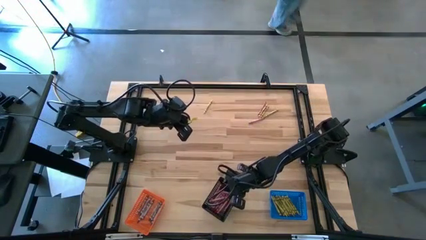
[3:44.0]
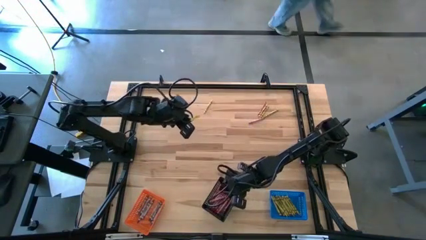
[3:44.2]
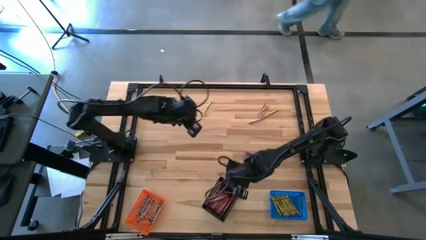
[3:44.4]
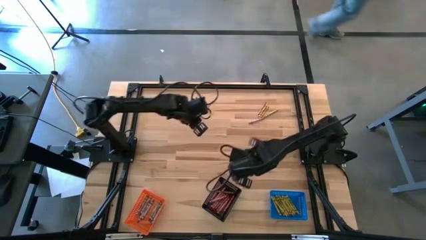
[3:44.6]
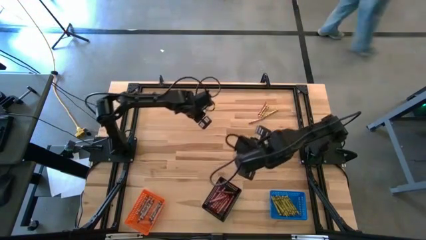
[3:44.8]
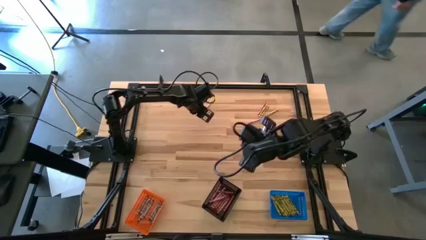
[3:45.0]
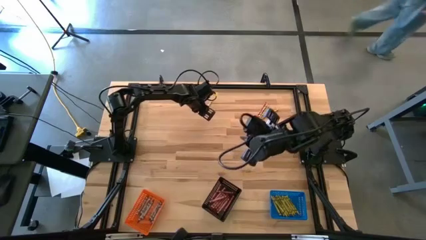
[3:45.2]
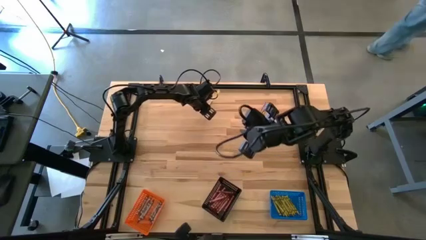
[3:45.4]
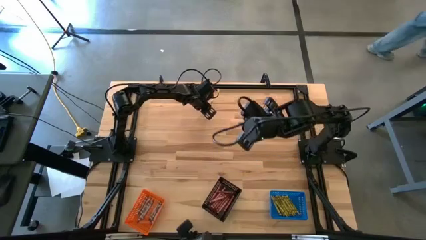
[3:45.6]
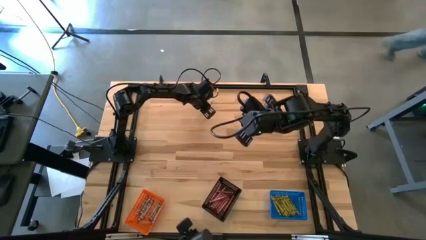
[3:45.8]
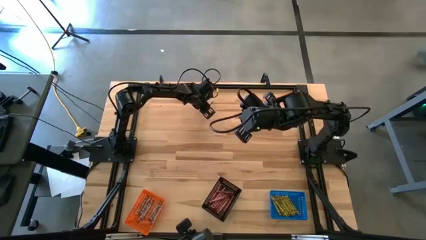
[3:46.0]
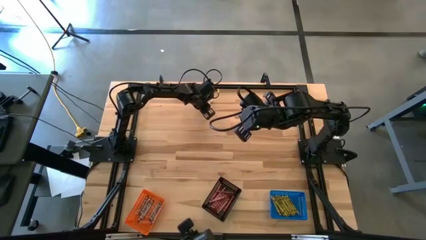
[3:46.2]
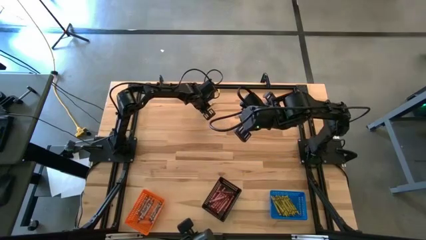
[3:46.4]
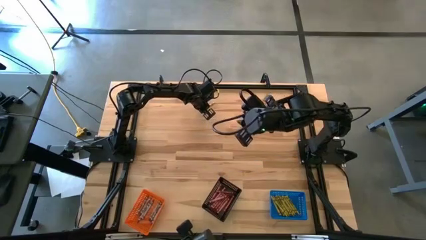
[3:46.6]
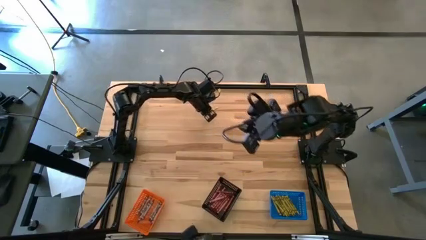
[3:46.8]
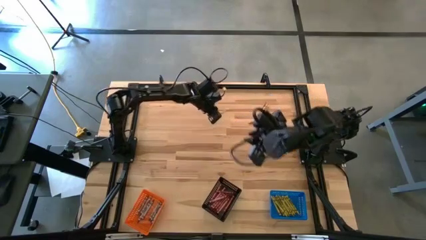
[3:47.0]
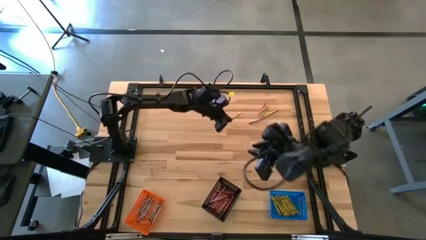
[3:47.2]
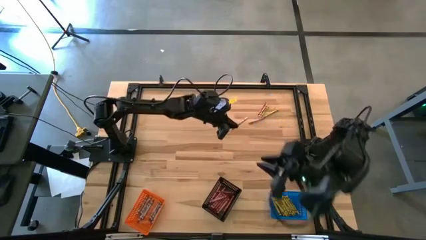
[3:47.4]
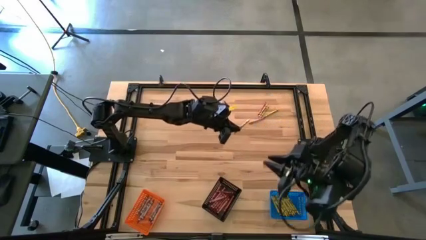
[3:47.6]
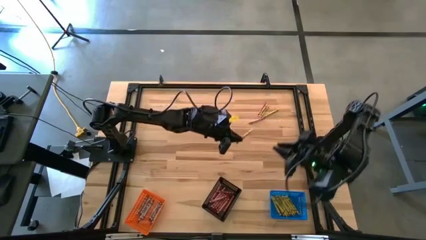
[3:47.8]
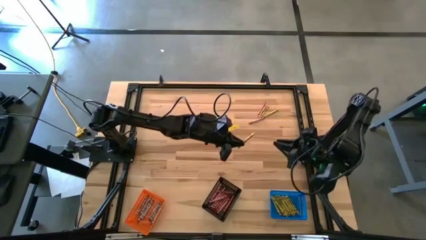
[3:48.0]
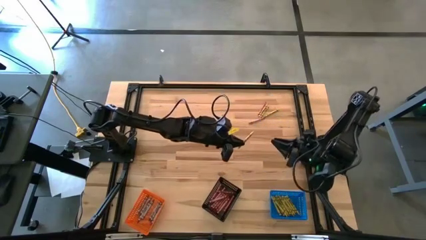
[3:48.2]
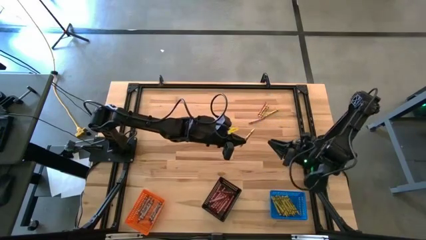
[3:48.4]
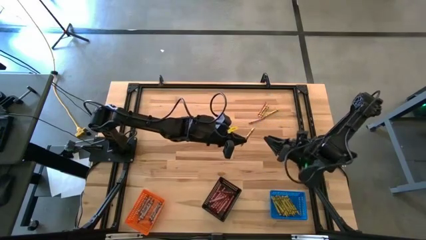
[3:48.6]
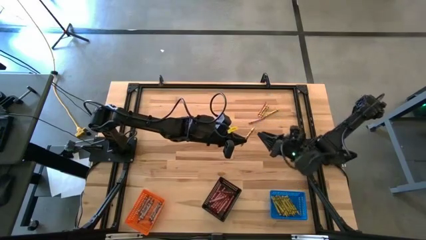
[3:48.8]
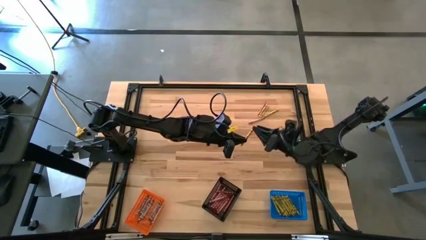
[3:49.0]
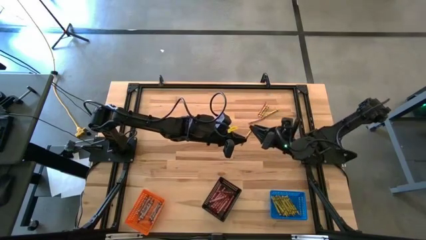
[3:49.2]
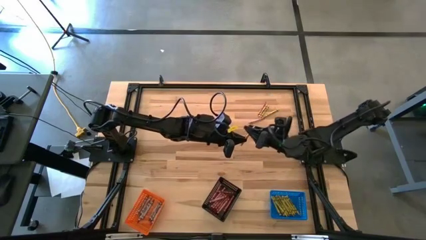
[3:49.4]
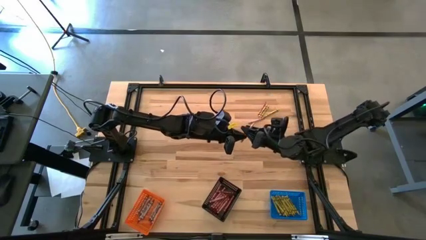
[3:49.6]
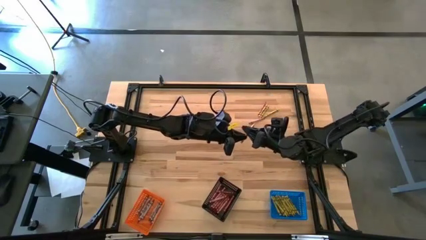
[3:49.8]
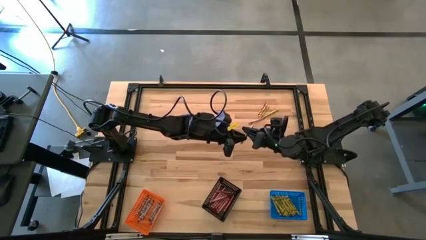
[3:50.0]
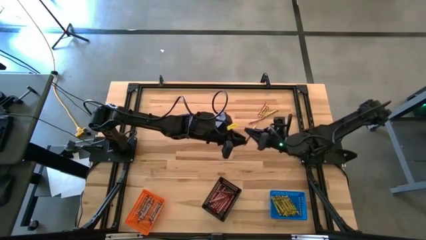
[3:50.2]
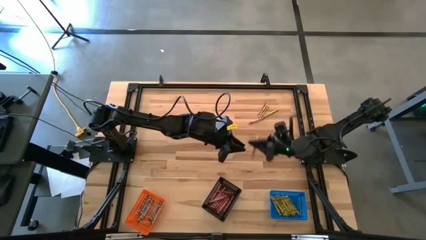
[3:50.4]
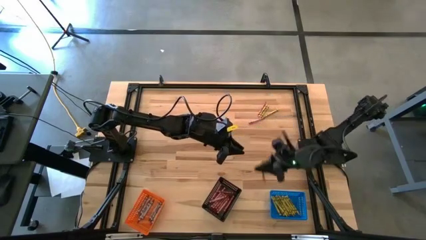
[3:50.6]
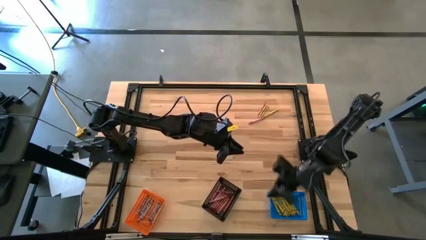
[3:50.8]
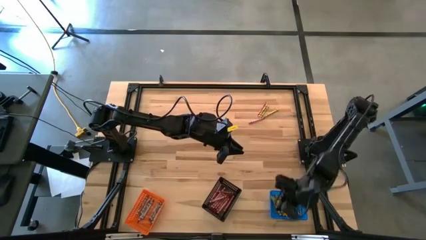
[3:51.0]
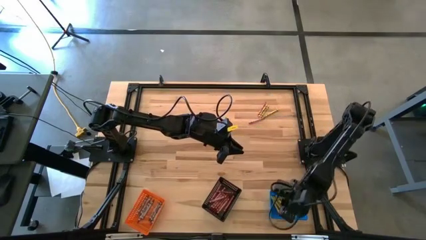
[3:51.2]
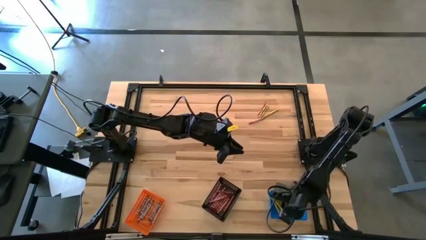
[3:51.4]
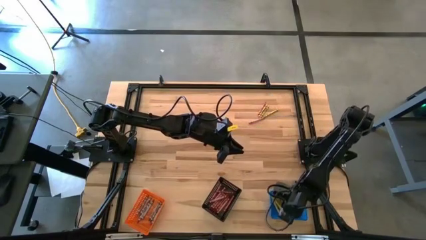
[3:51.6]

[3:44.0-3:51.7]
Task: Sort crayons
Put the yellow crayon into the blue bin

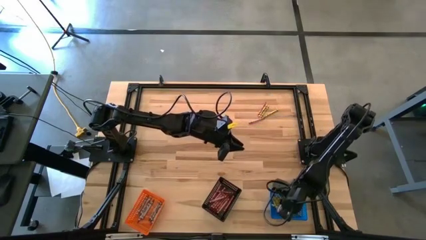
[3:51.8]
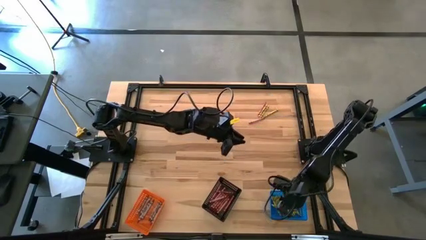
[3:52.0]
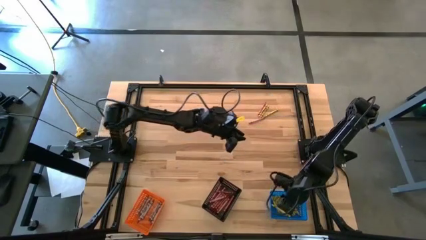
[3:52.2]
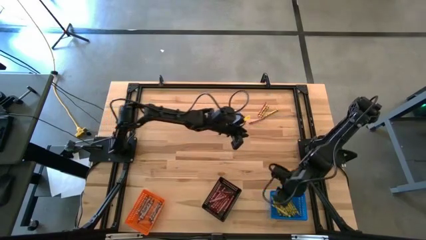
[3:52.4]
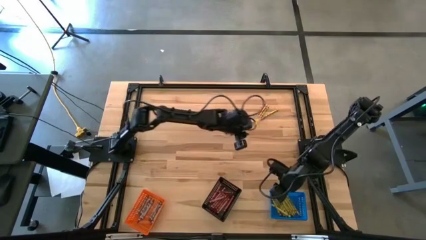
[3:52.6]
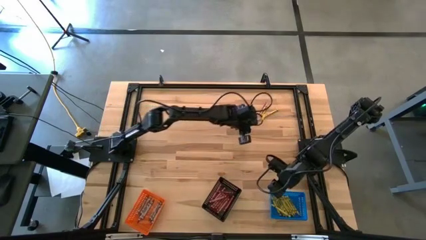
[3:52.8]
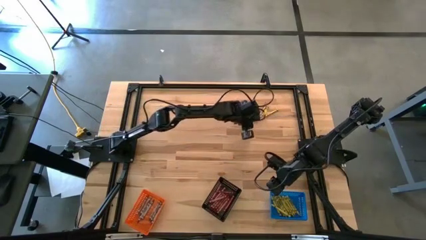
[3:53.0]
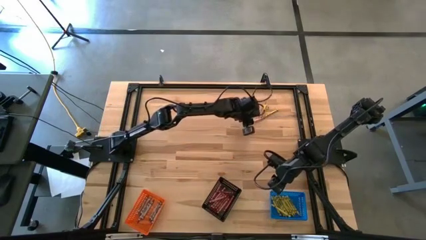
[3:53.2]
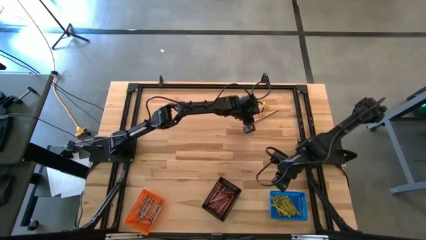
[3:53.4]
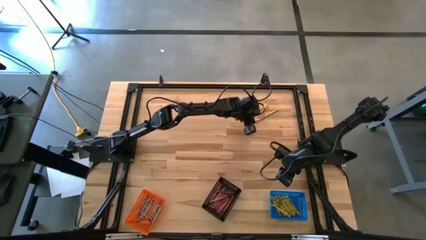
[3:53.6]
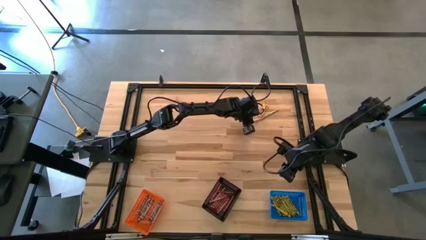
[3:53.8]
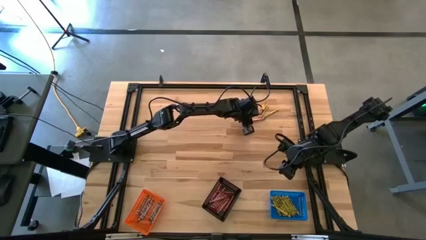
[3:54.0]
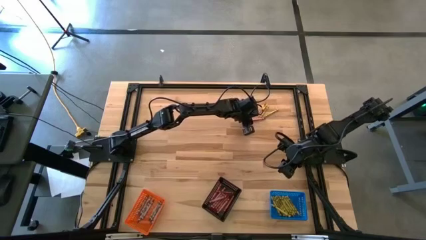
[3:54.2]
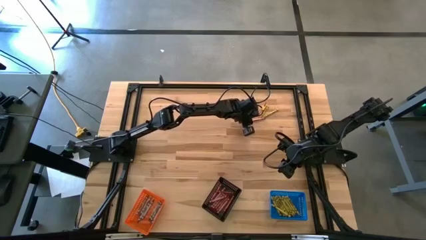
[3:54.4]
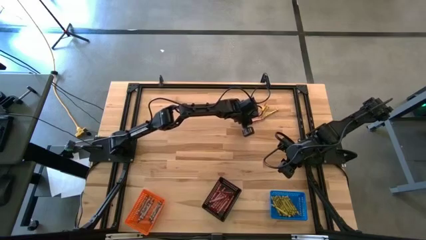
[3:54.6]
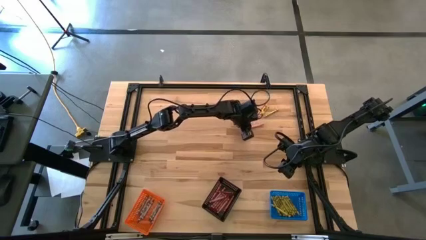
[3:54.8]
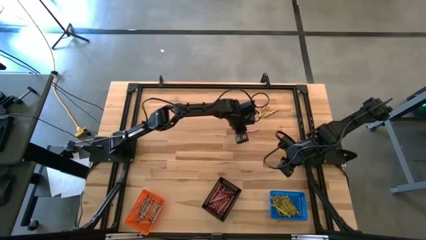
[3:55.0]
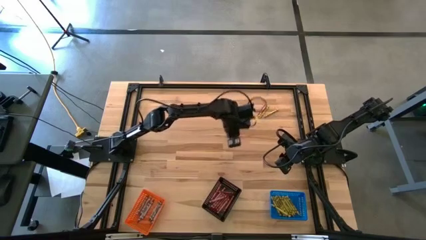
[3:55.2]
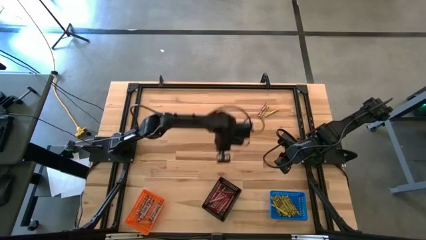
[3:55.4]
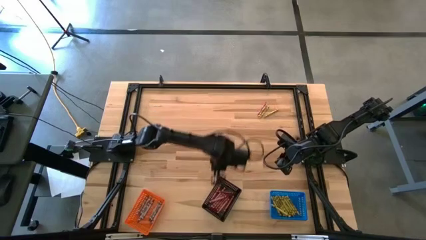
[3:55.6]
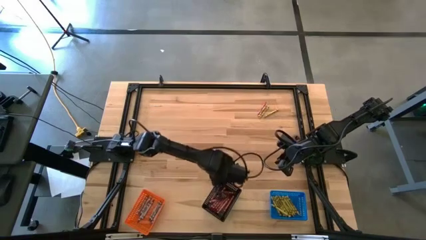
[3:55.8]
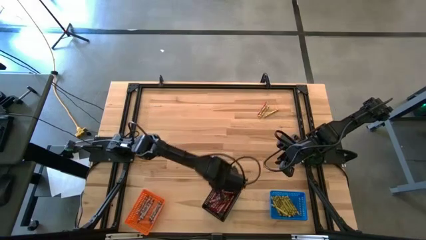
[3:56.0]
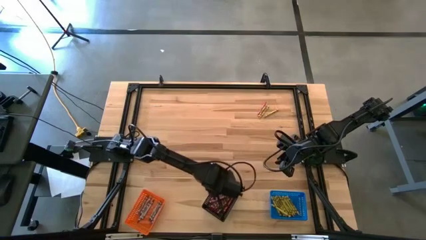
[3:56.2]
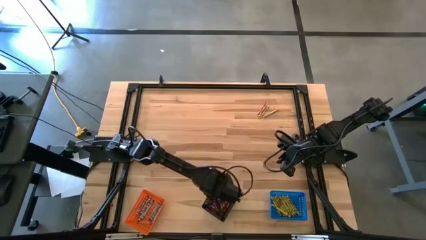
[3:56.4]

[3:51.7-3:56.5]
Put the red crayon into the black bin

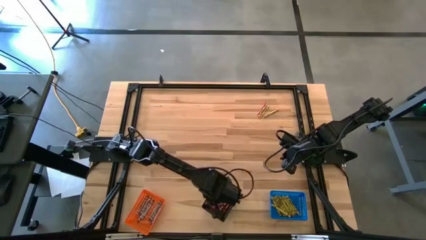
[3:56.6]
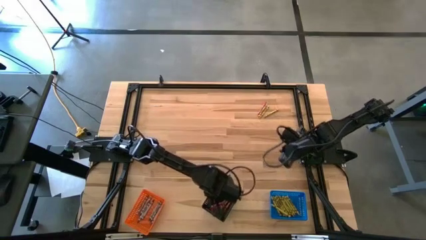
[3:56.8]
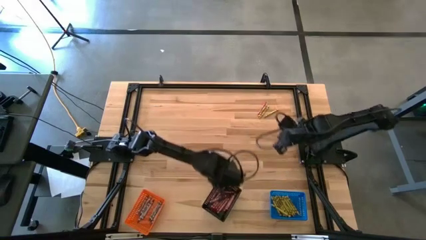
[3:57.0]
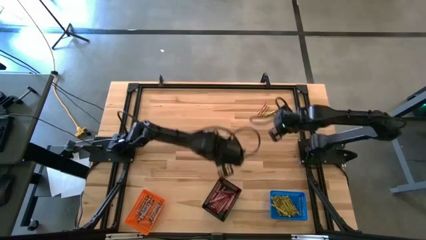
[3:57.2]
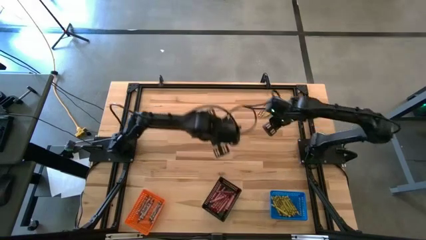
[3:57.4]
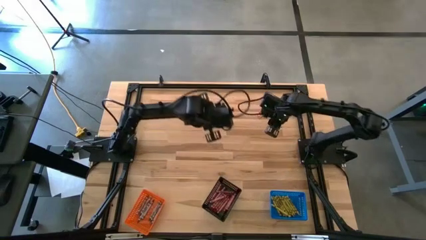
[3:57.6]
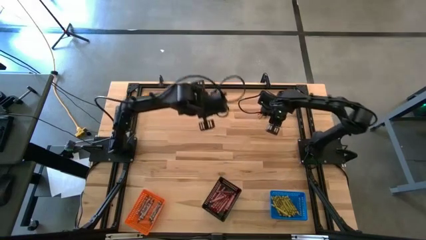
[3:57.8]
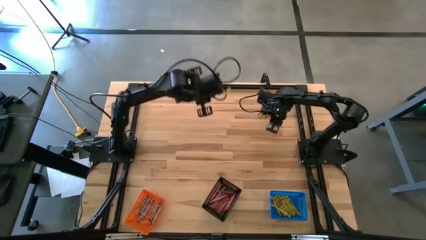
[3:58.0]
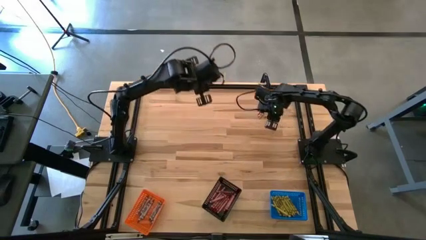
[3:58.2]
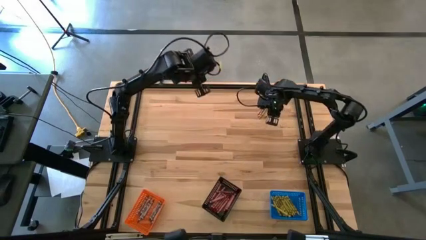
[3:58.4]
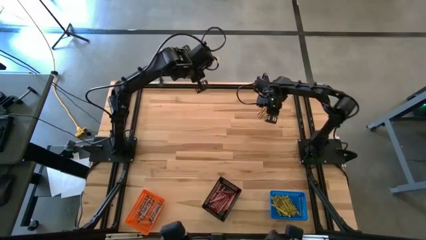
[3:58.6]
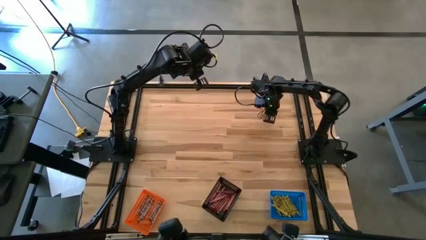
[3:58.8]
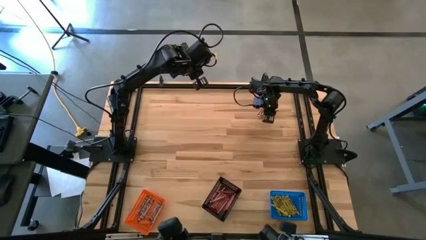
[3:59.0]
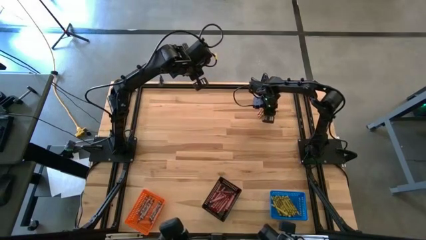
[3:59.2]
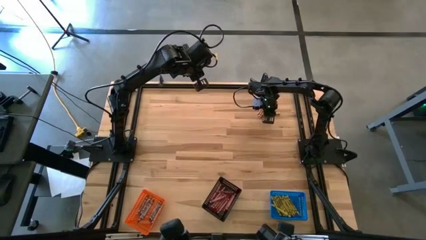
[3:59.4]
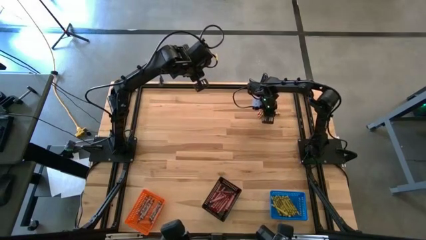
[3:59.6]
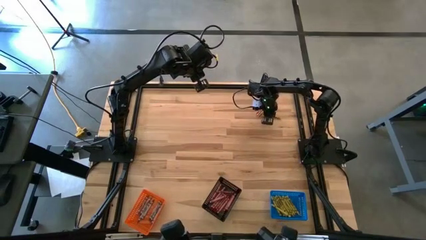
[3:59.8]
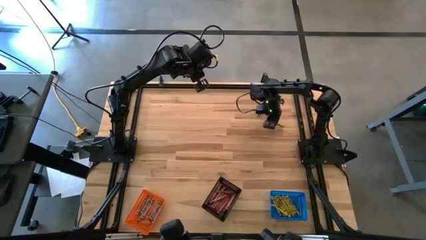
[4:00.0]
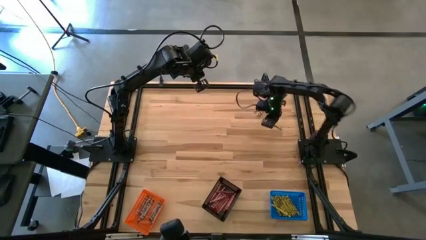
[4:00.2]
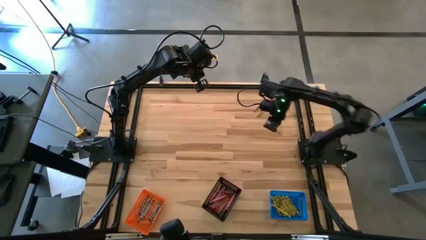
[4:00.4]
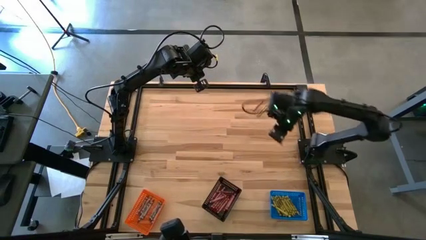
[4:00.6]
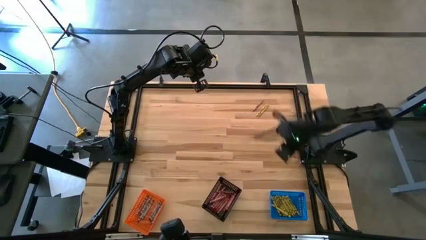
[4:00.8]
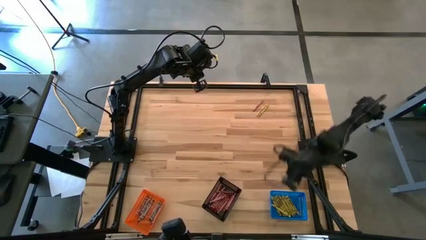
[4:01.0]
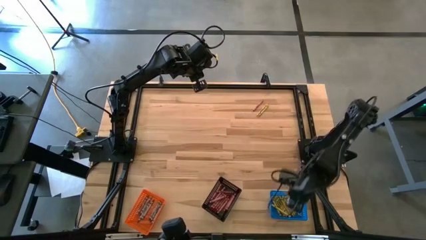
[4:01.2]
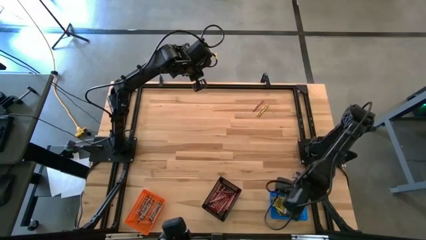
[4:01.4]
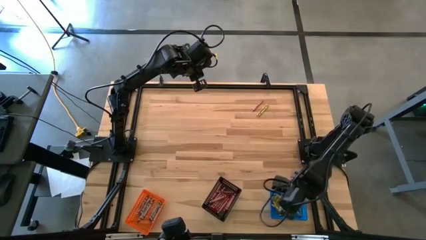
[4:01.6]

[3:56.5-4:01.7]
Put the yellow crayon into the blue bin
